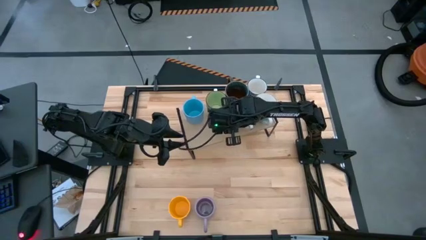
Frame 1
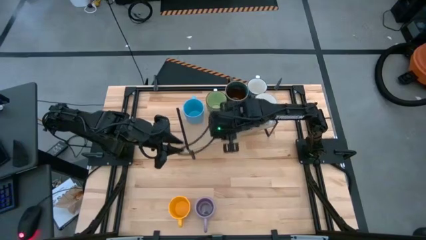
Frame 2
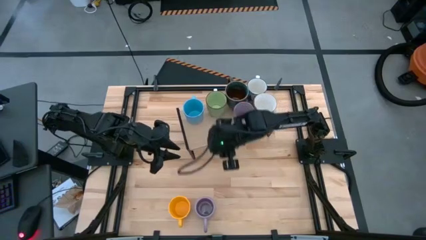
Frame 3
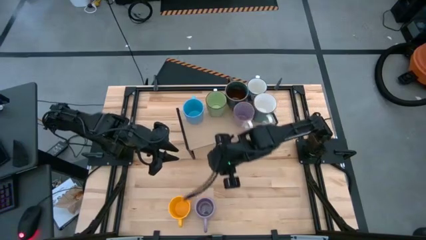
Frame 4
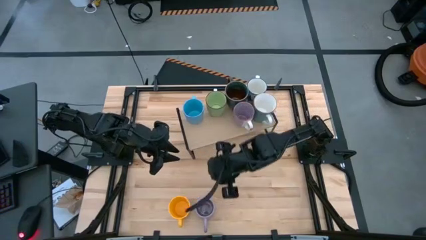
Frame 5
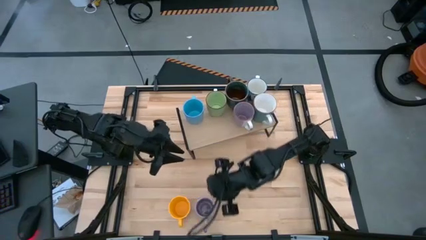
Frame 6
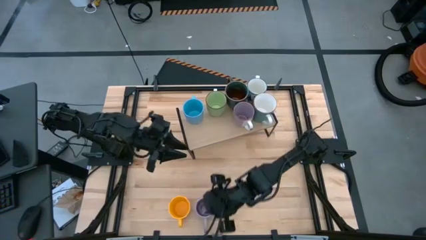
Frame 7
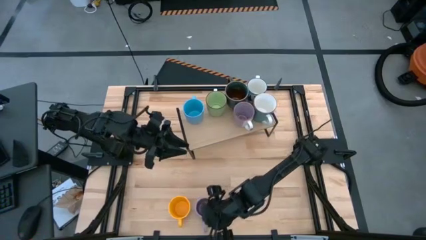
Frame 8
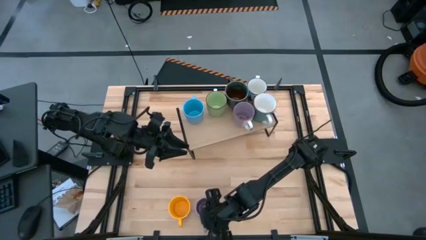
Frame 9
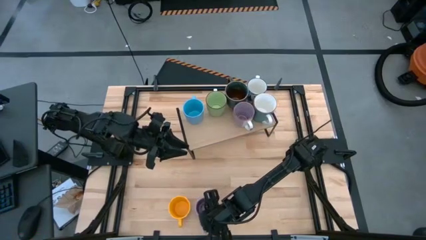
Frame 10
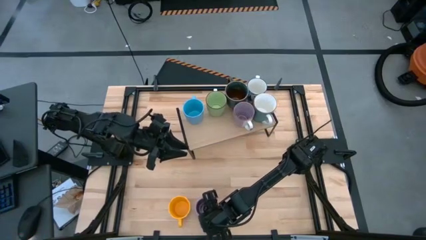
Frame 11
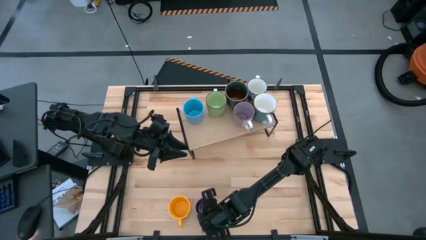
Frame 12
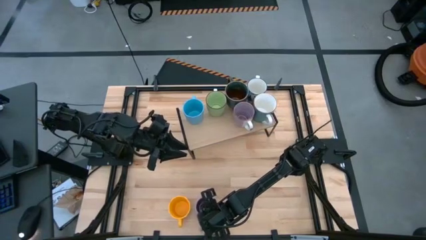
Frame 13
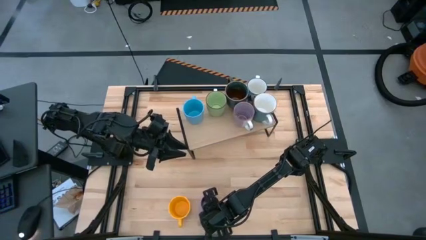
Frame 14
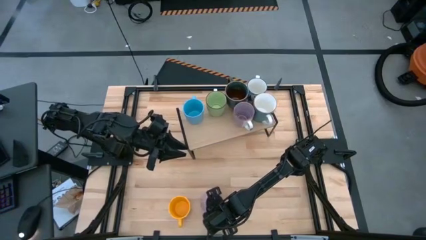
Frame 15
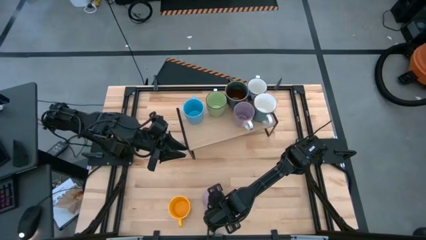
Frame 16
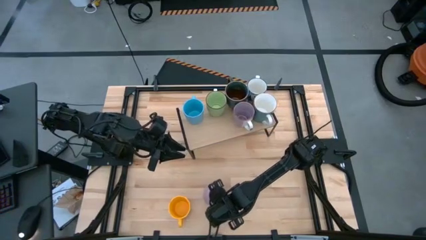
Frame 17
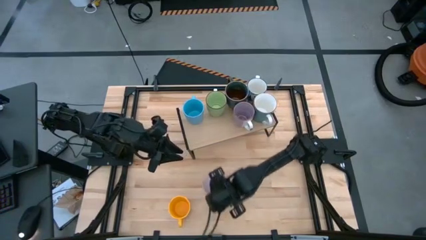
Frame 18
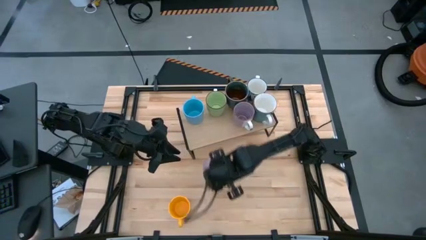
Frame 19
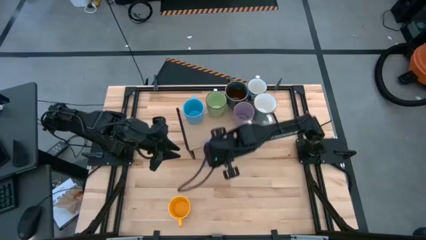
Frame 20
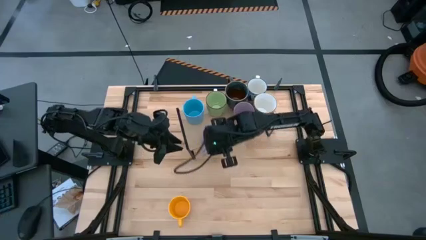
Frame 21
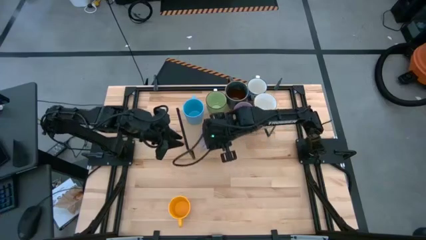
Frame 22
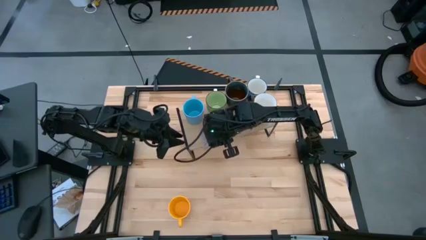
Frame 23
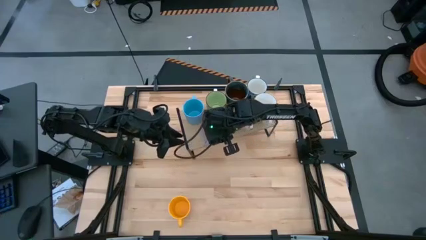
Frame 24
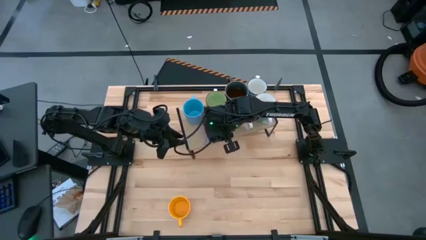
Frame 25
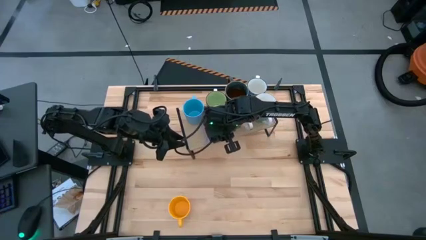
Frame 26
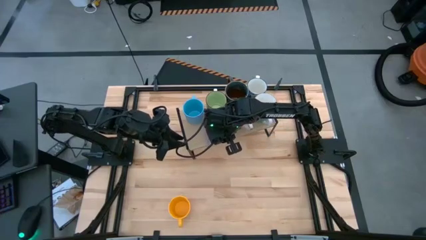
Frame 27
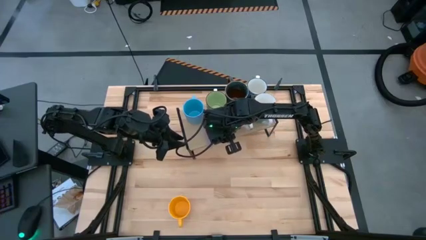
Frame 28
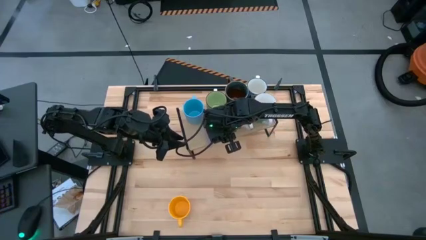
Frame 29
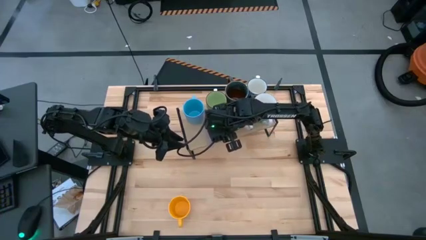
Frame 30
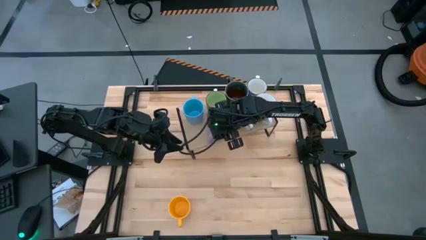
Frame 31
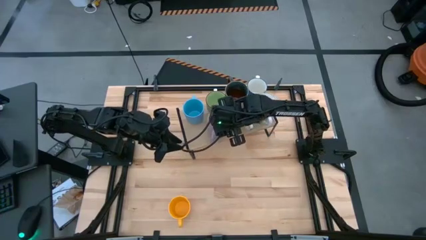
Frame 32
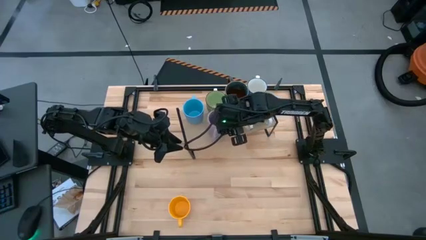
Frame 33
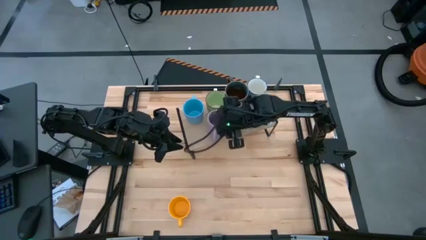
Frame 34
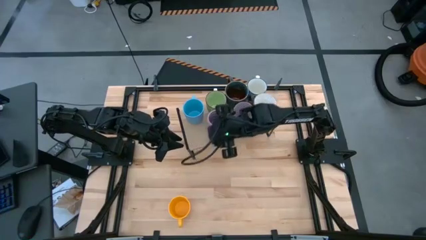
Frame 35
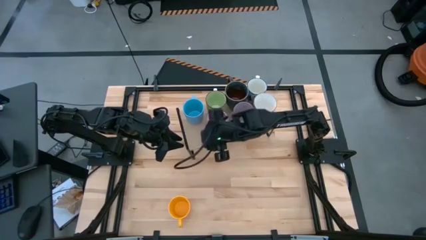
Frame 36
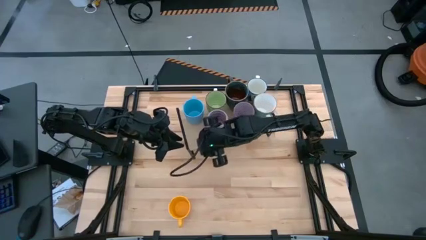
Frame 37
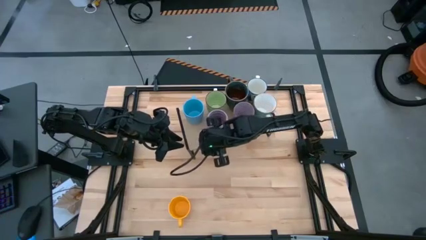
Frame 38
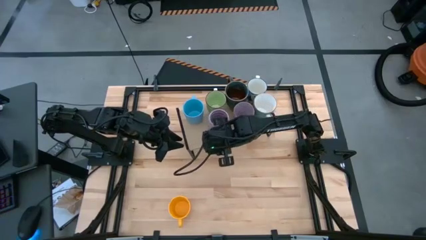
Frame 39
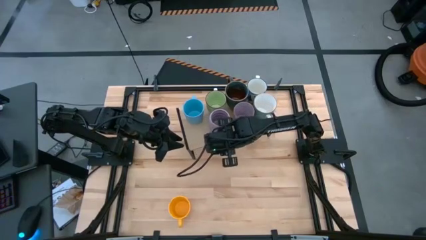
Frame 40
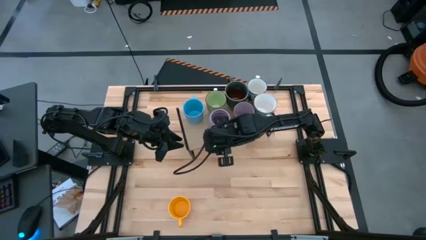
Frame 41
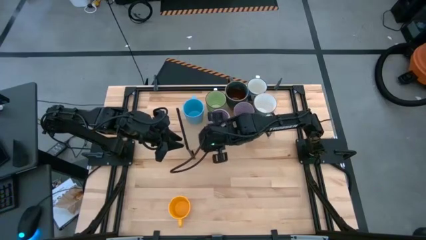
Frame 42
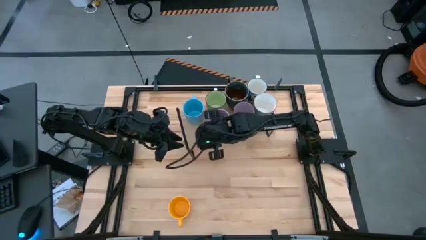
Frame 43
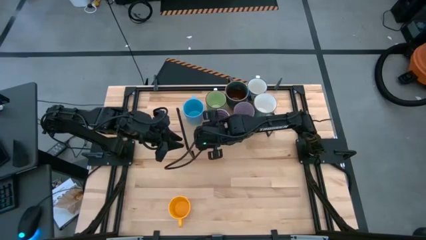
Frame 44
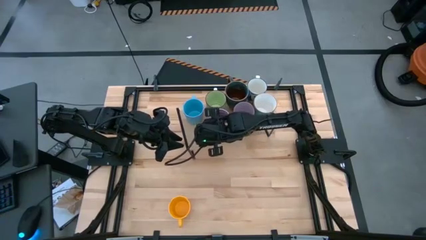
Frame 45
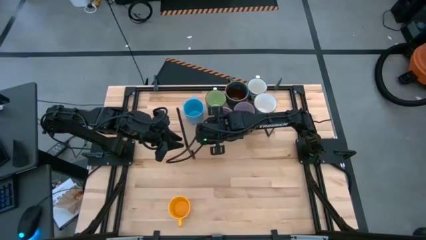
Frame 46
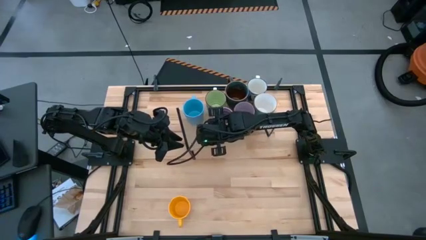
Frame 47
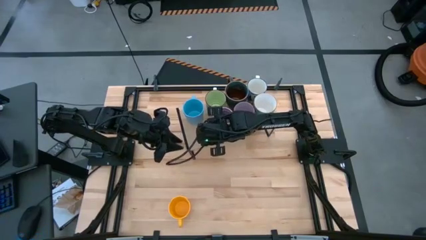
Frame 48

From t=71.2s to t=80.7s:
Task: Place coffee mugs
Put the violet mug on the shelf

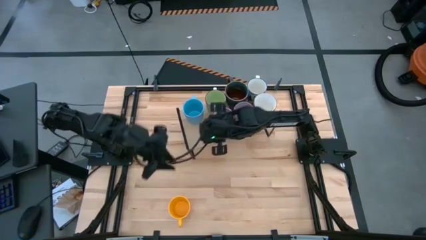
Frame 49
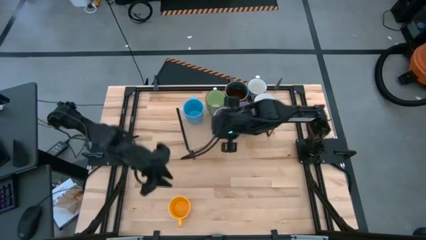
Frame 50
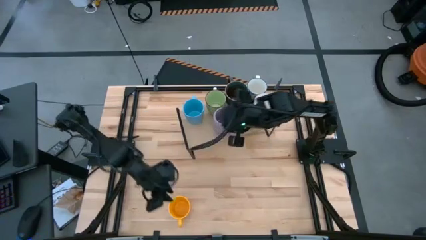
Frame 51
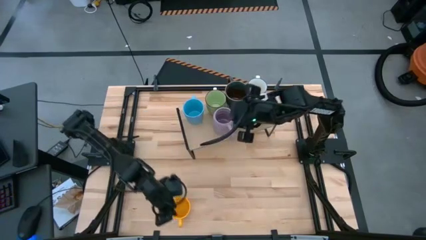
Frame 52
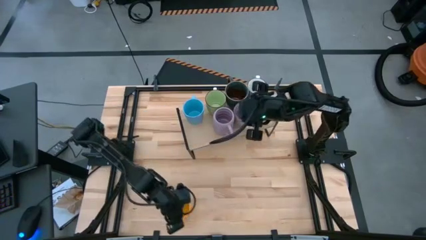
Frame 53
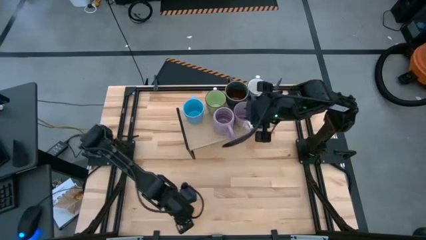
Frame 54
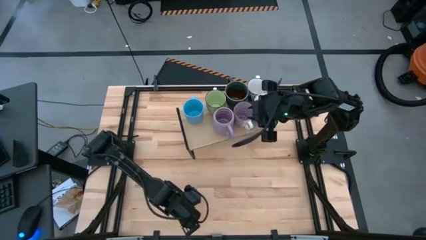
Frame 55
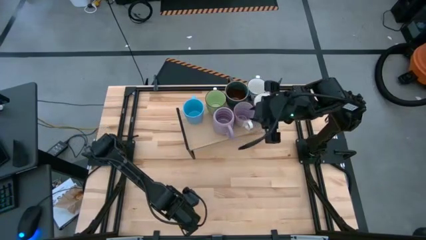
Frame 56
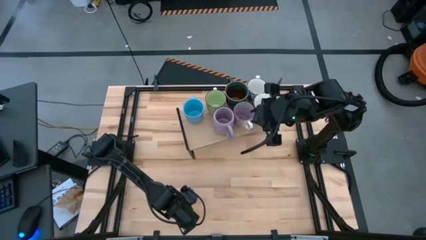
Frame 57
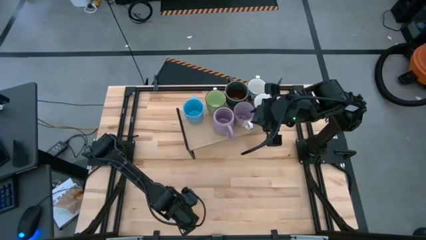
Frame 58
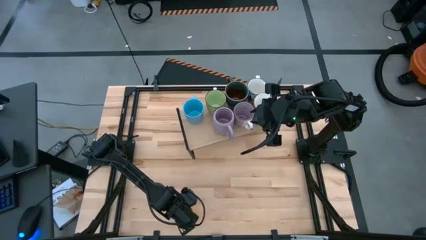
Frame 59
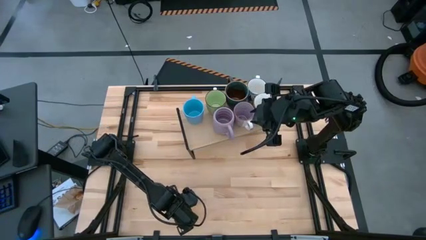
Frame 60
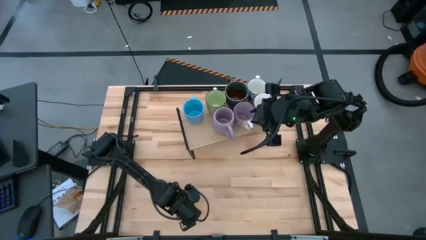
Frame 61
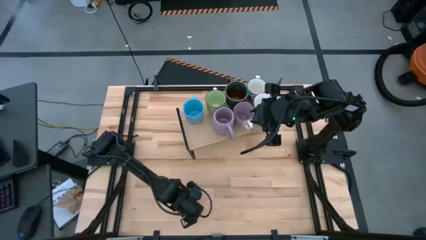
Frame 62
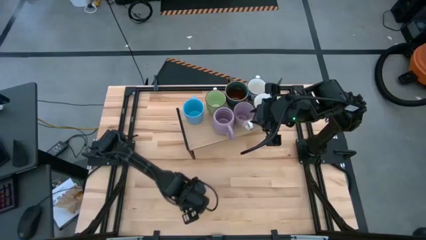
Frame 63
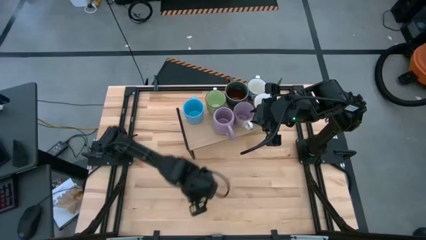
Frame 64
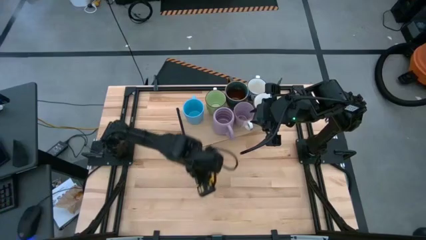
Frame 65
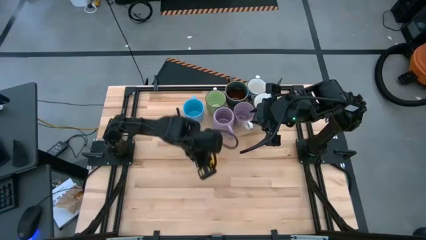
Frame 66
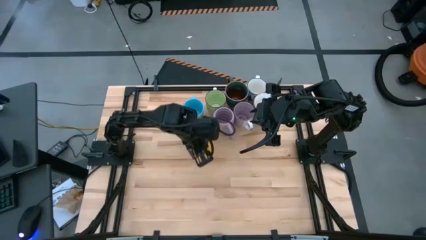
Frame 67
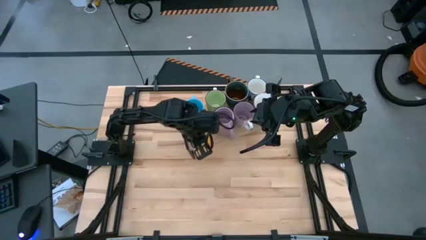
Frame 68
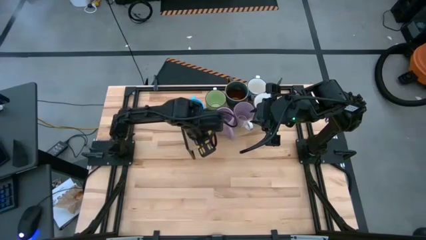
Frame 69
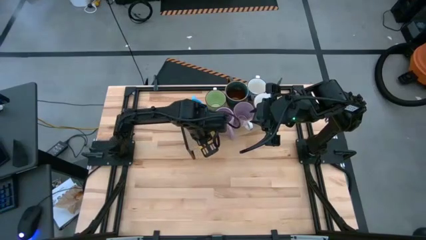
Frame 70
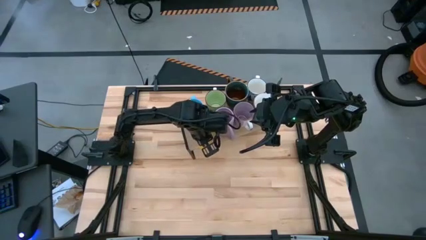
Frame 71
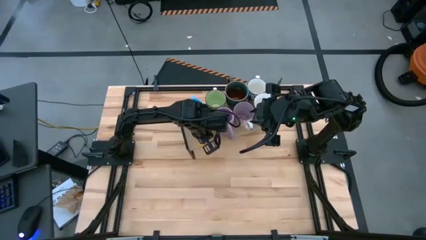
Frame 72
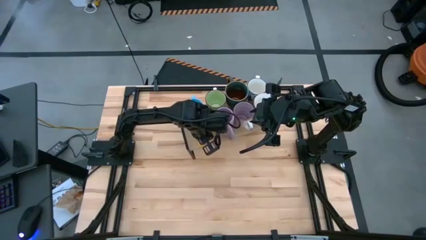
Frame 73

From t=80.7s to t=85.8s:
Put the yellow mug on the shelf
